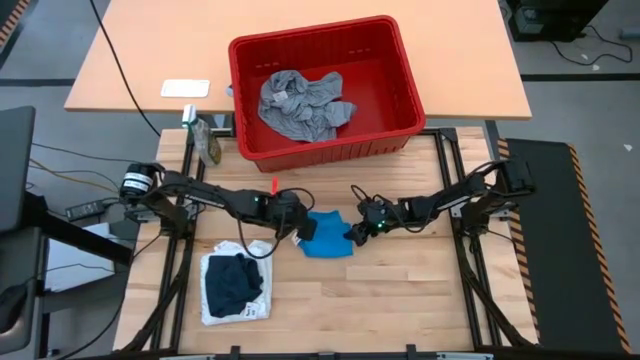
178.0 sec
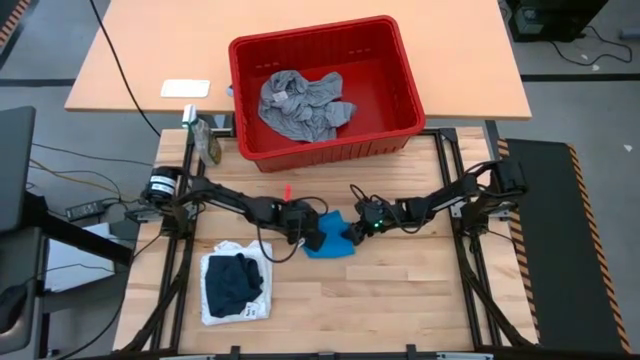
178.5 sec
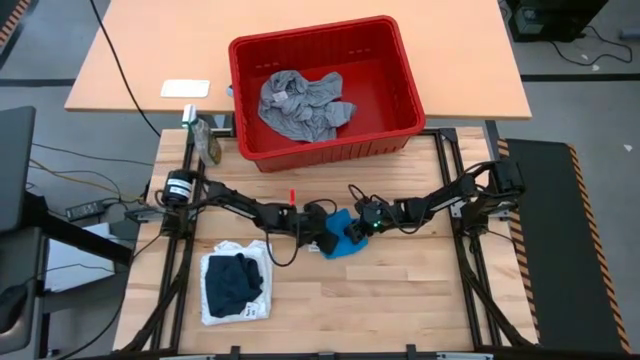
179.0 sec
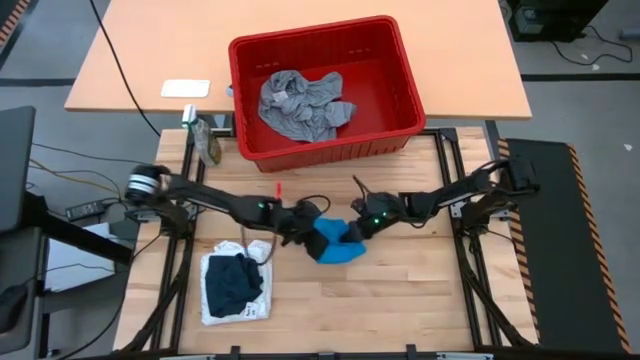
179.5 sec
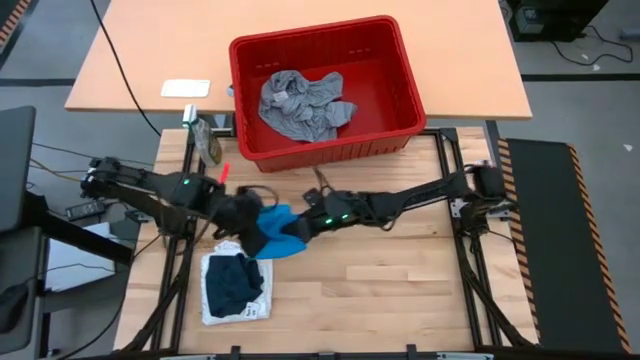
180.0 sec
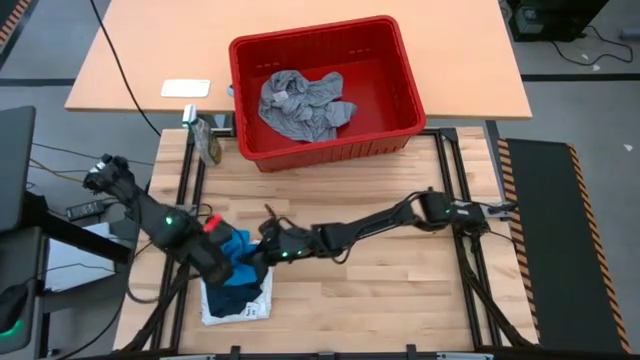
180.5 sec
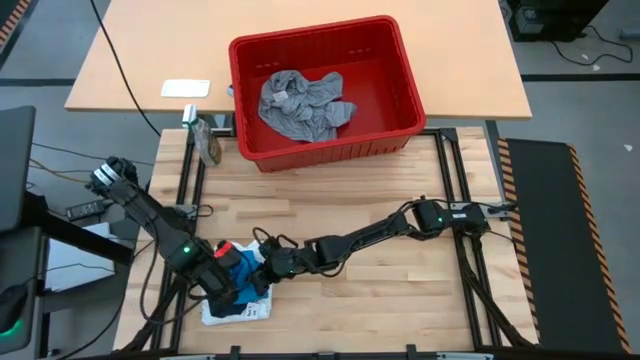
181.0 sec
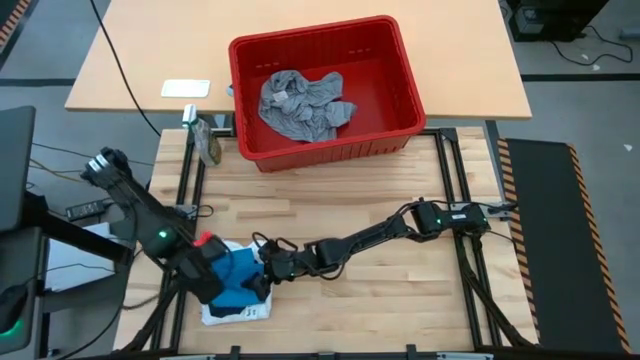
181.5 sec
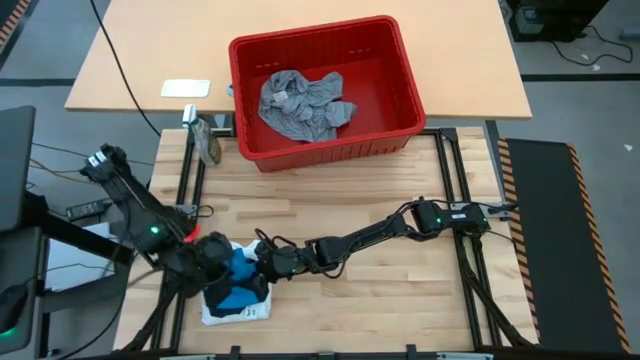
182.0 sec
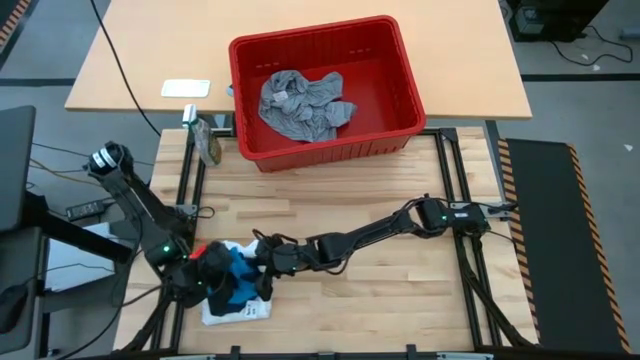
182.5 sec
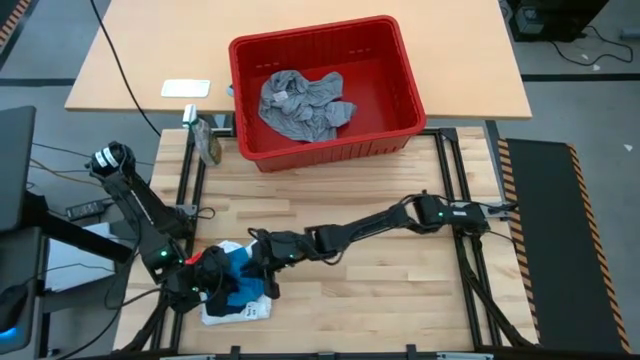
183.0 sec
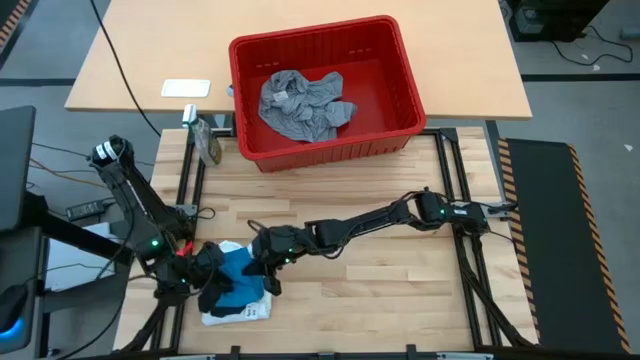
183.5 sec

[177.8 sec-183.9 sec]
Task: Fold laundry
Stack the light blue shorts on top of the blue shorts

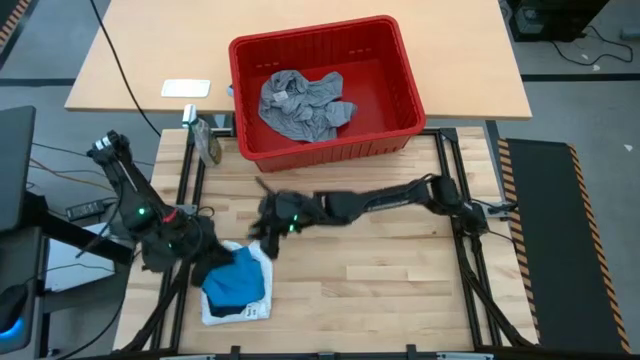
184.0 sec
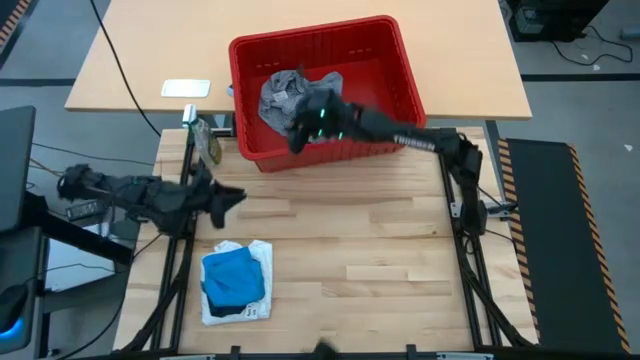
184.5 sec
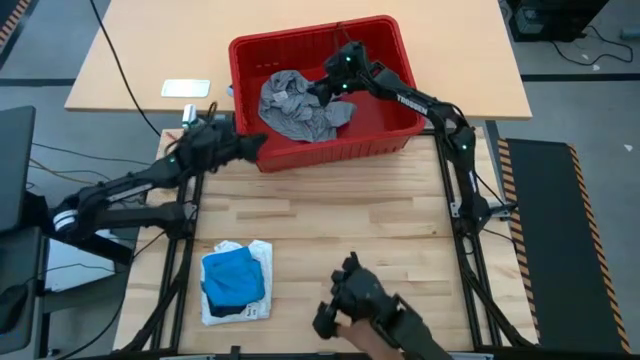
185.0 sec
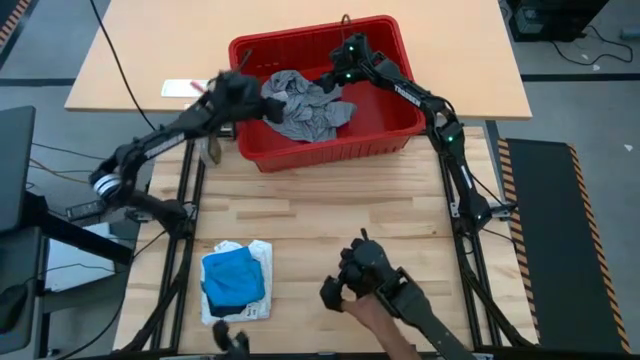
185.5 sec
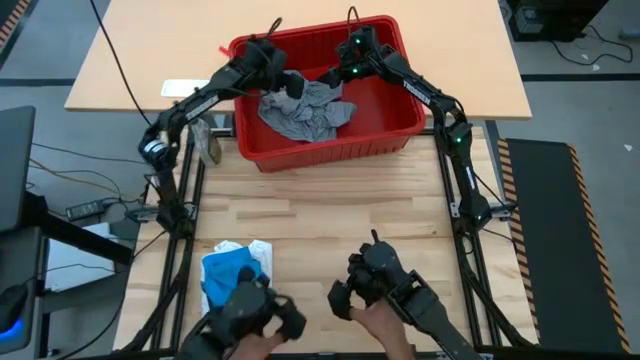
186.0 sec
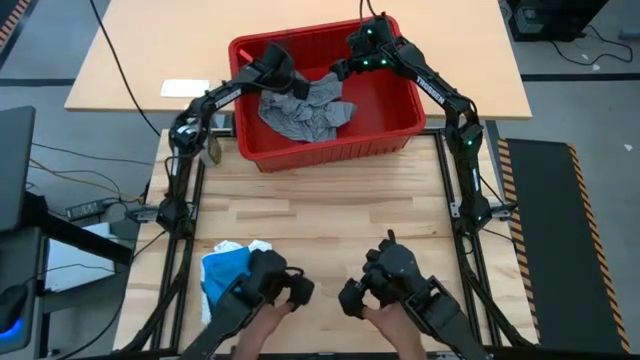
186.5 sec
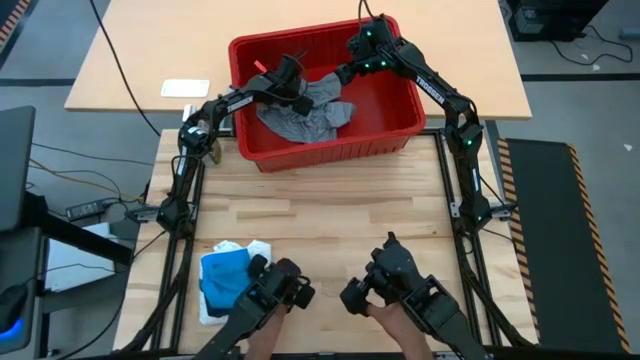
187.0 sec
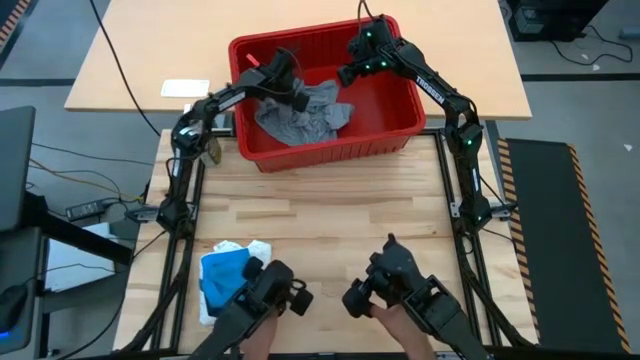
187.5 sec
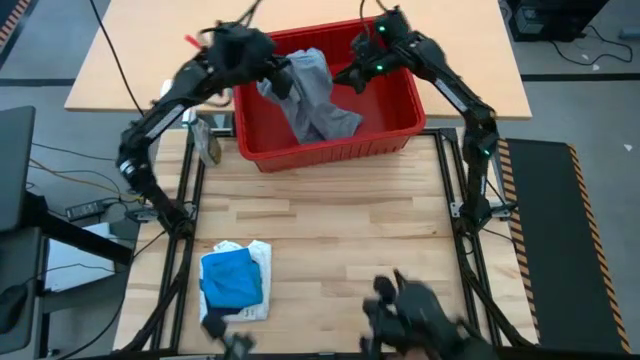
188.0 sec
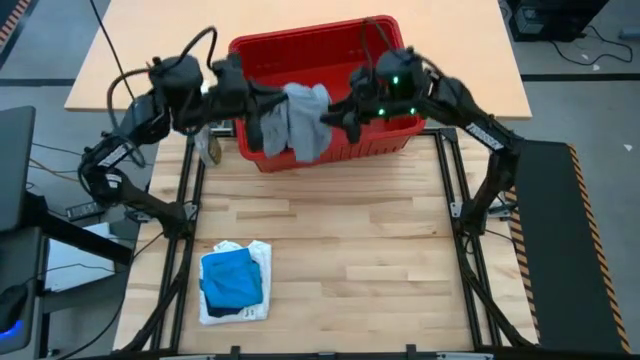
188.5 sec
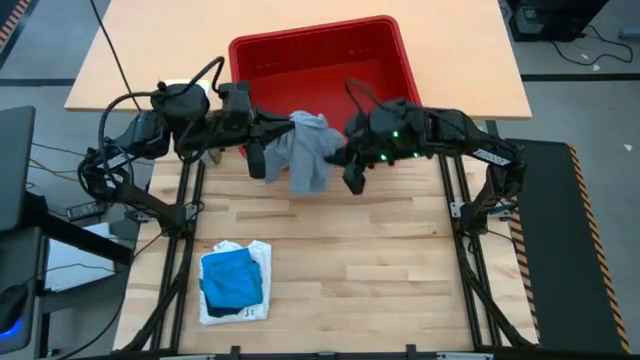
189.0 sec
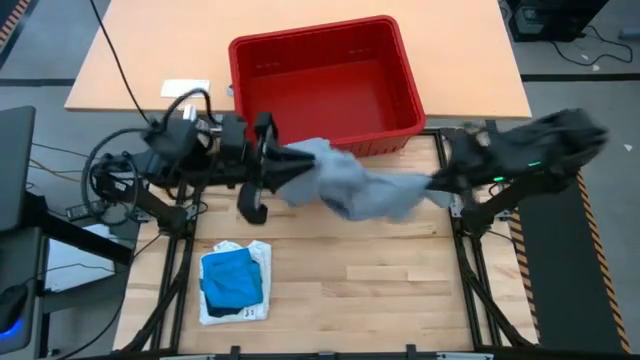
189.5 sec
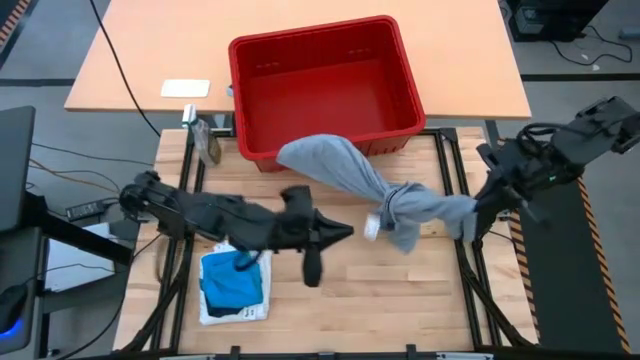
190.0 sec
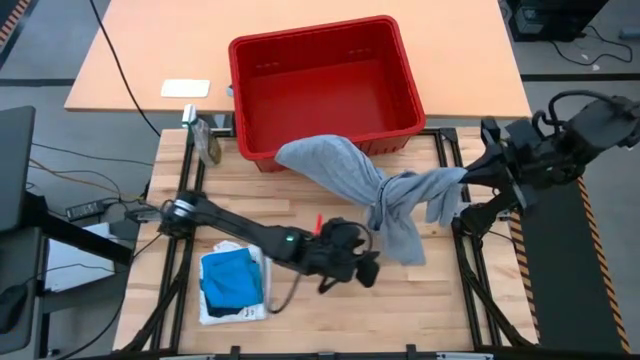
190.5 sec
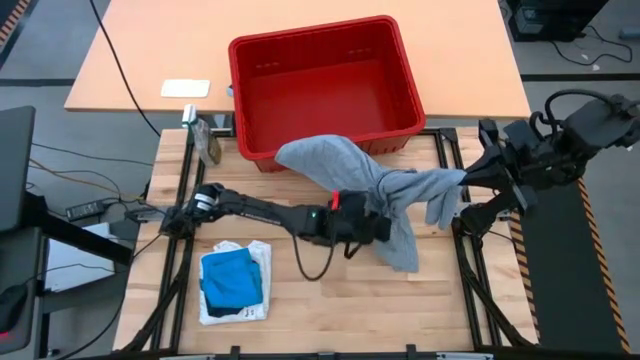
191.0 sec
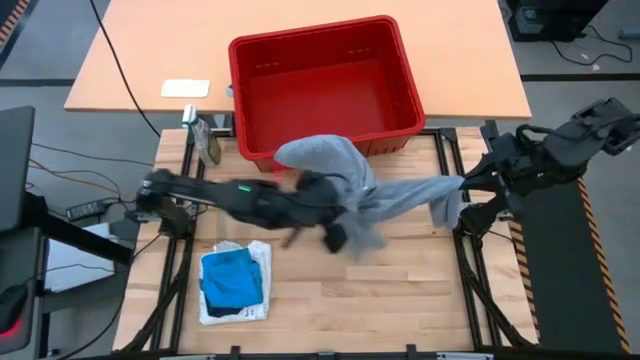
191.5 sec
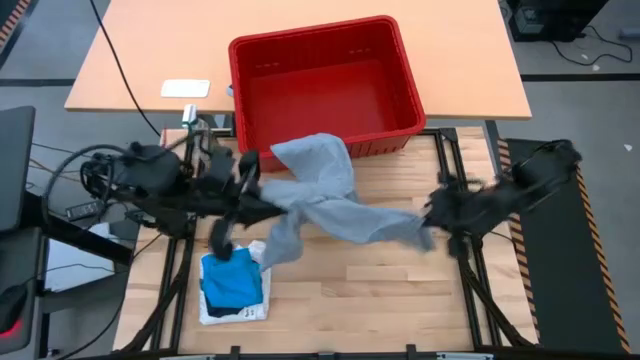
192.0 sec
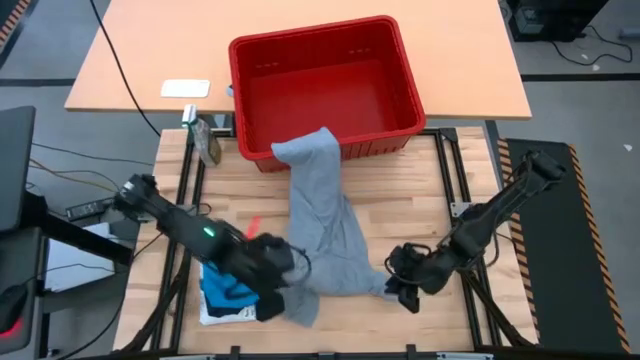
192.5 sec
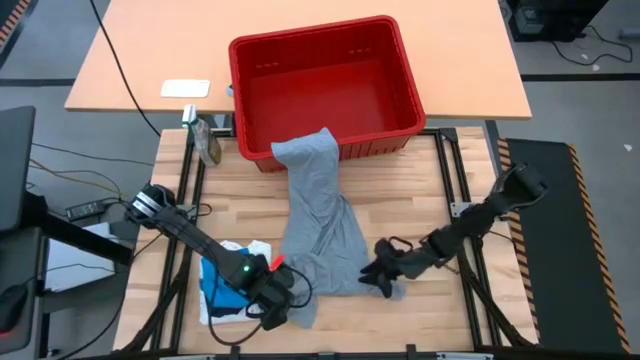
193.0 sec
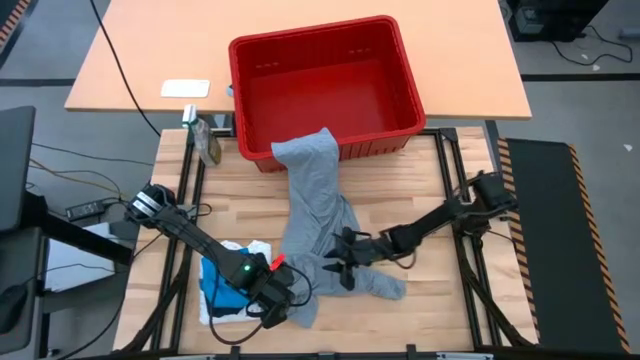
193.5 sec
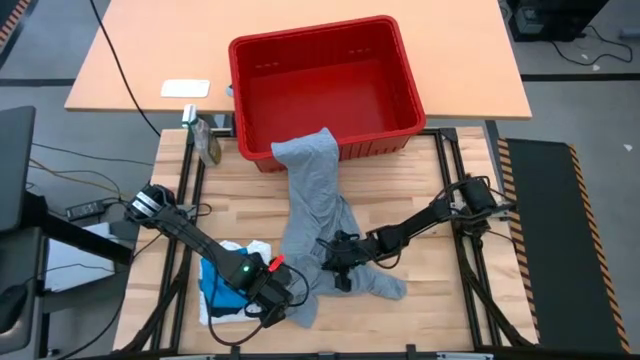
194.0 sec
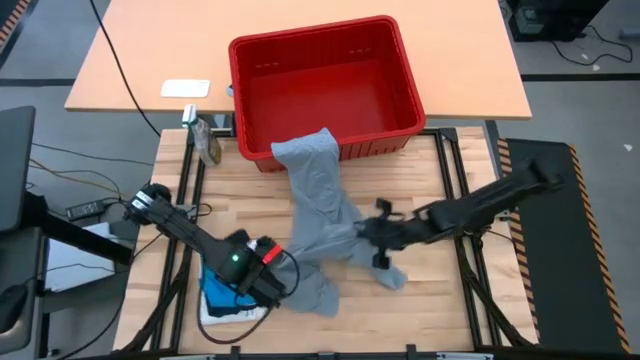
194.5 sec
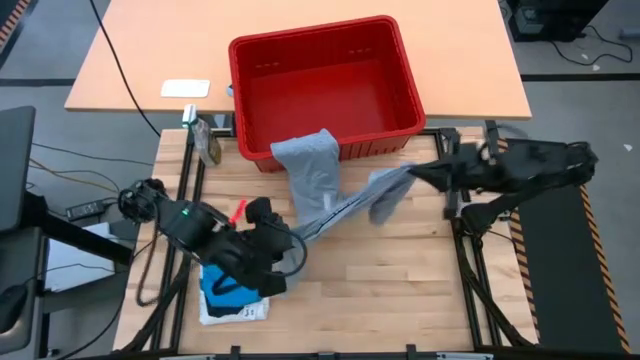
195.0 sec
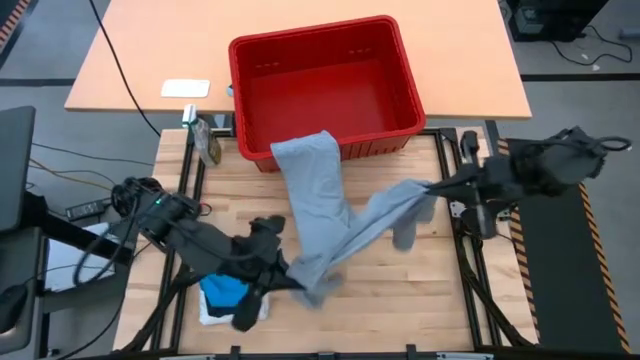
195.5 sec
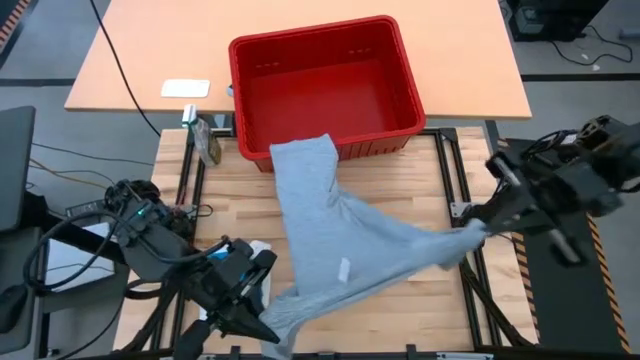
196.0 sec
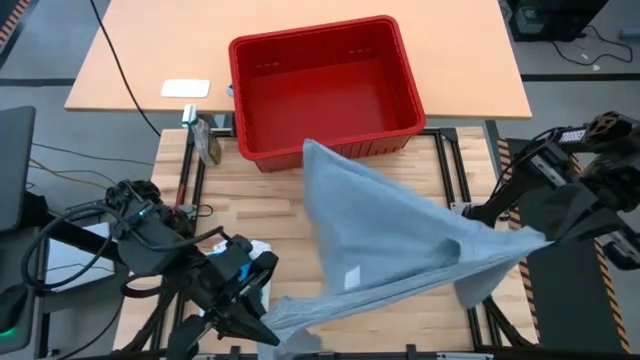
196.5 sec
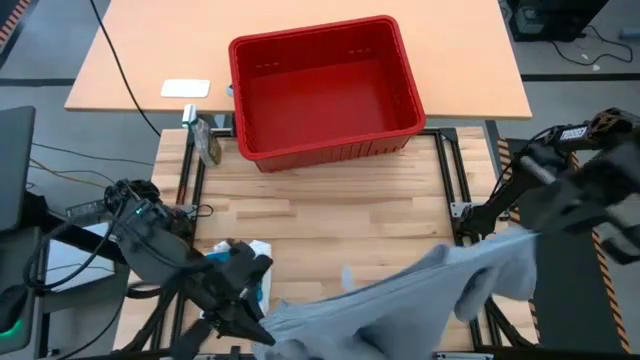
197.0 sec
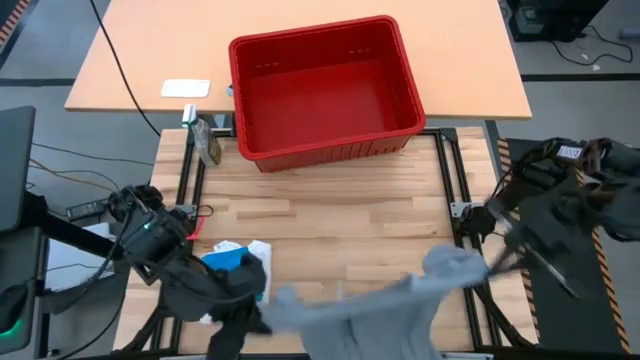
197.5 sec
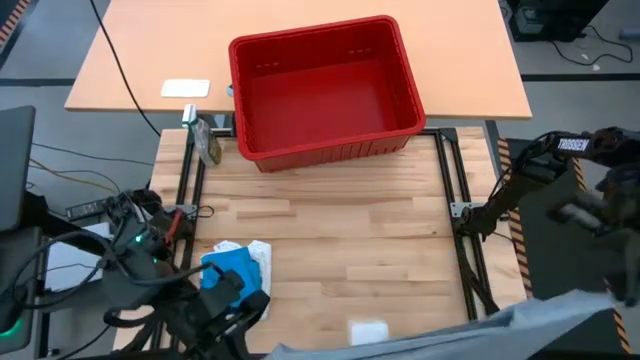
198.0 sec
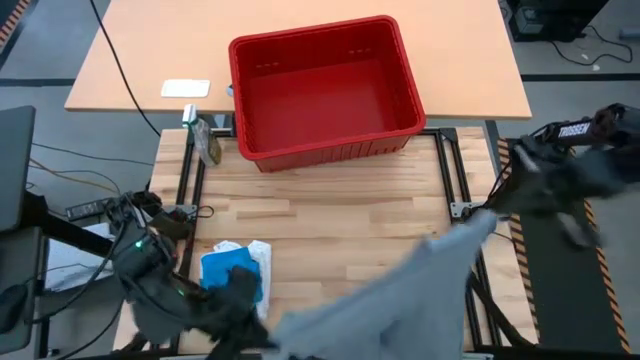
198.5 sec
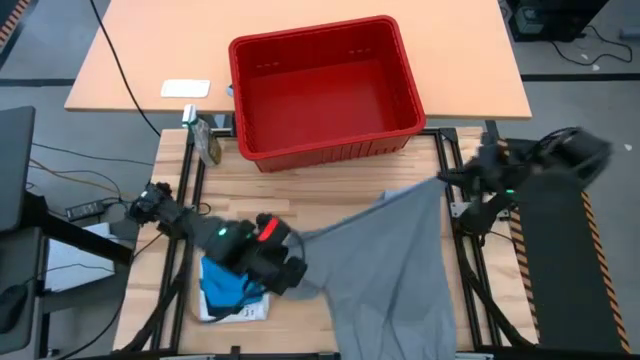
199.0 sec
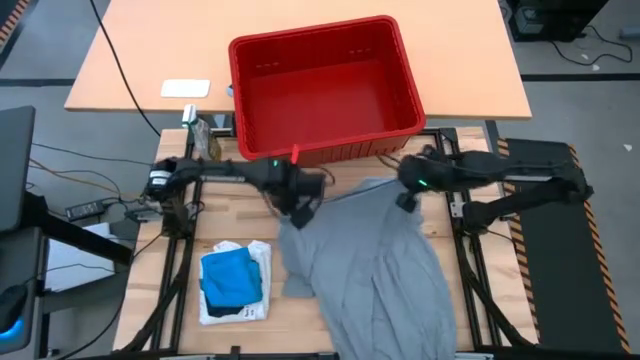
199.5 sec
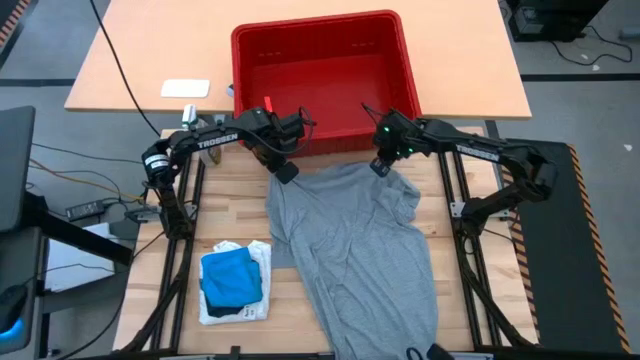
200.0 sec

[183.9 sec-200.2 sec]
Remove the grey shirt from the red bin onto the table

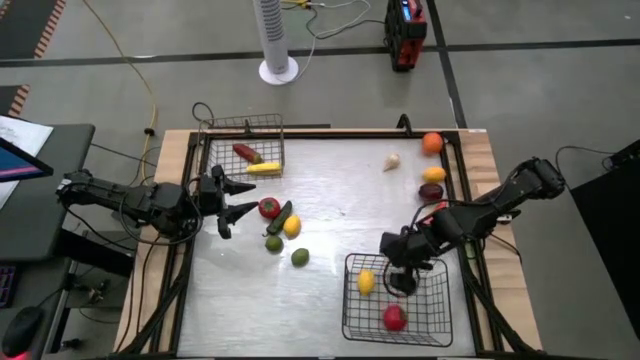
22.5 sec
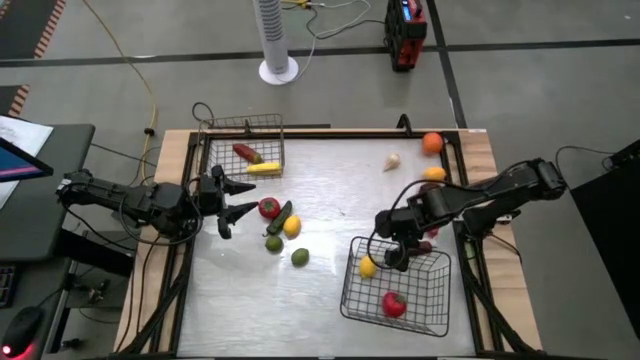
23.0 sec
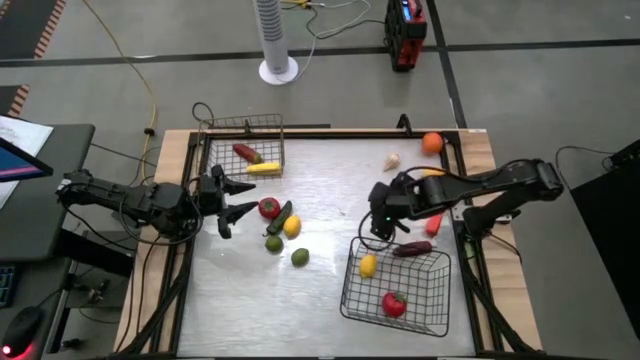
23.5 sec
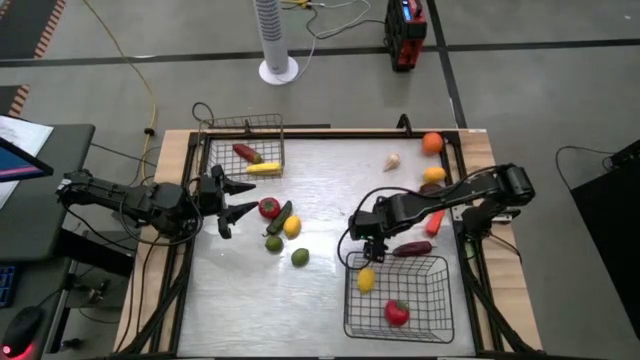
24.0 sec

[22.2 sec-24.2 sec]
Task: Sort produce into baskets
Adjust the bottom wire basket
